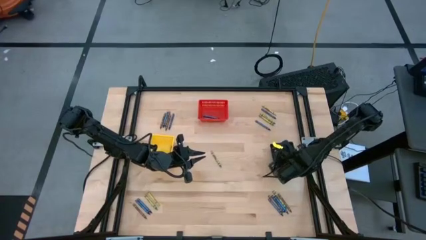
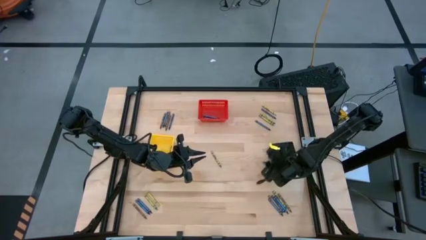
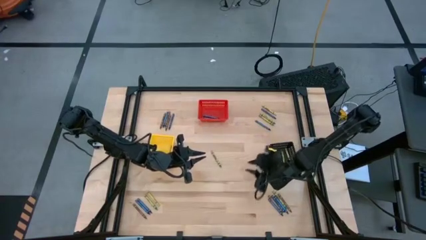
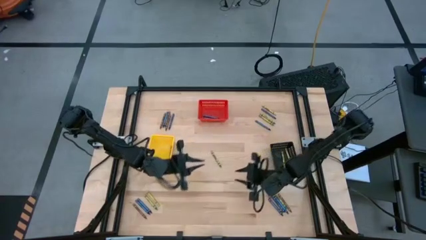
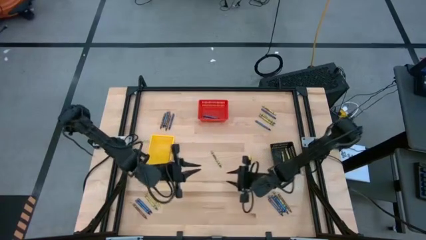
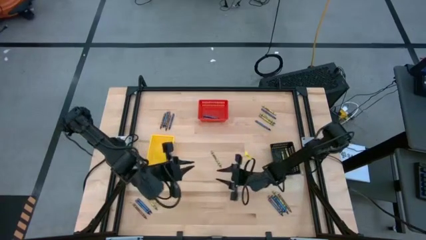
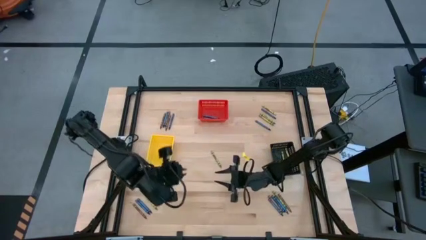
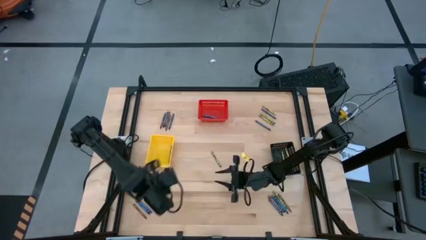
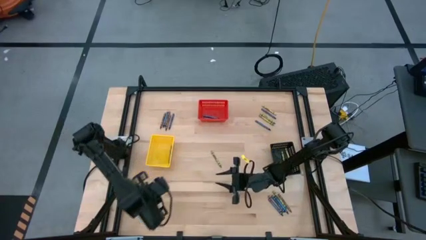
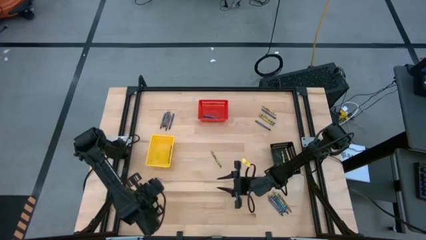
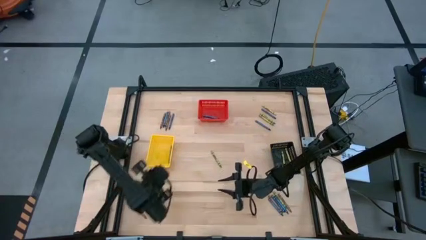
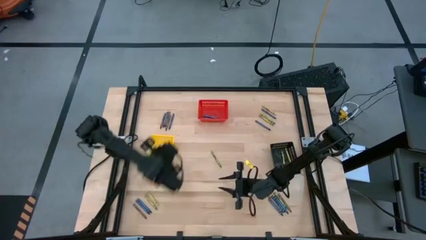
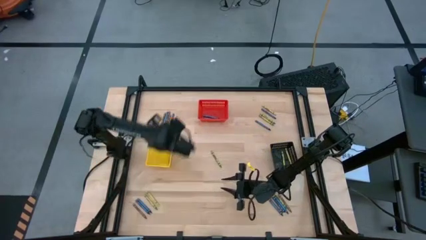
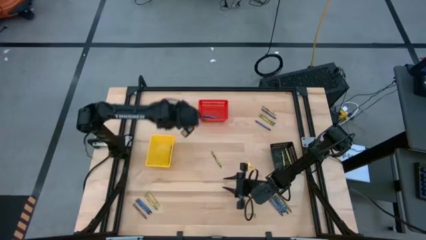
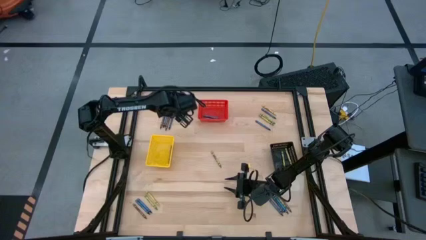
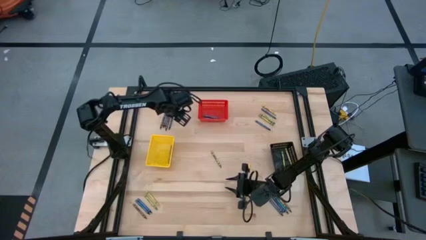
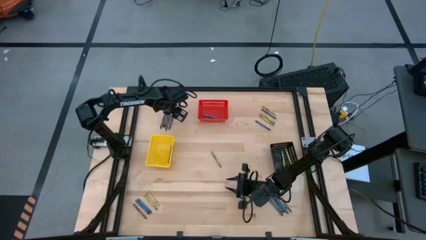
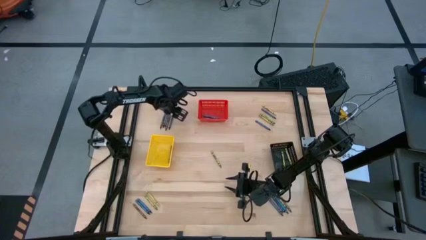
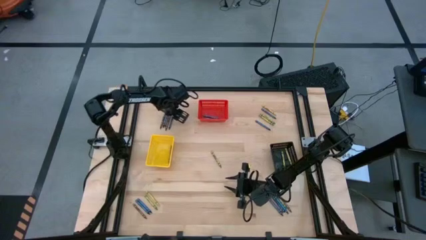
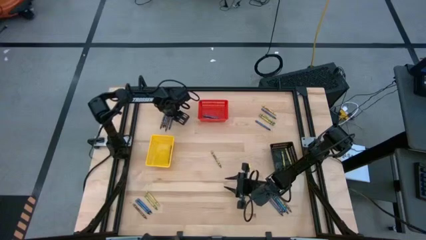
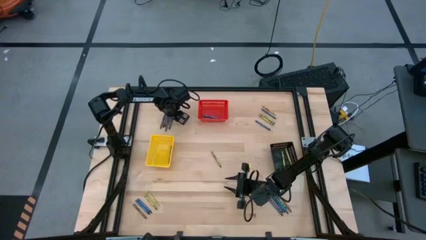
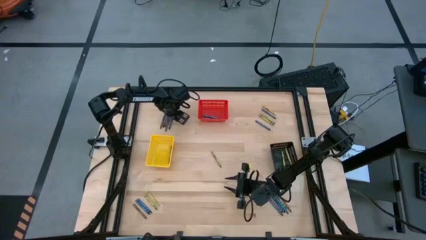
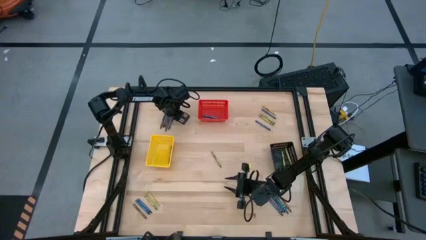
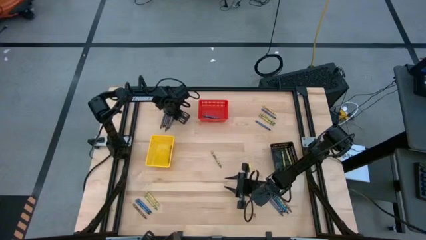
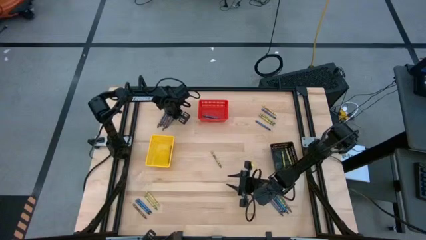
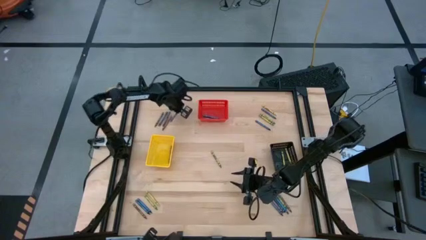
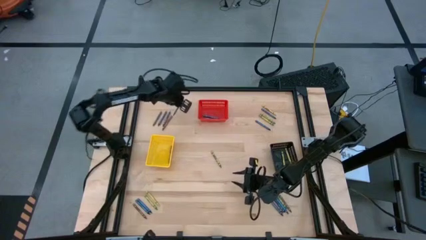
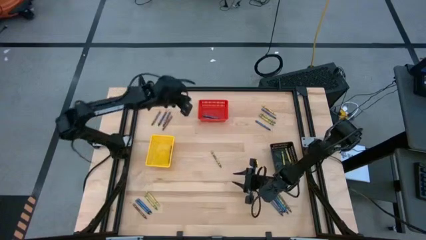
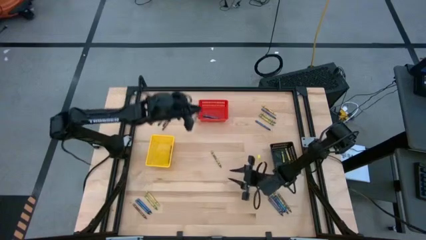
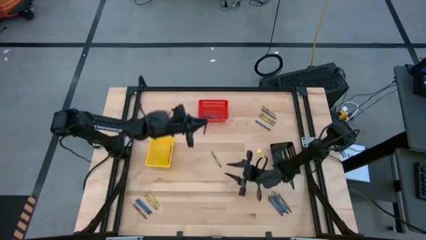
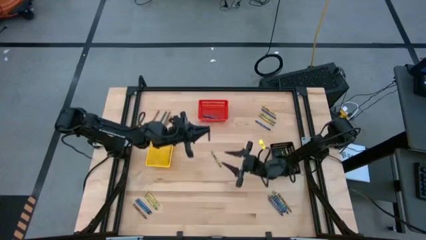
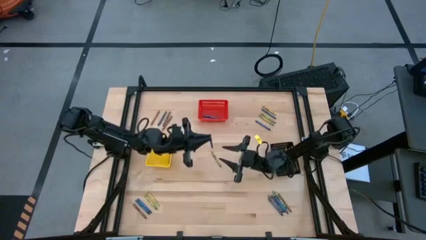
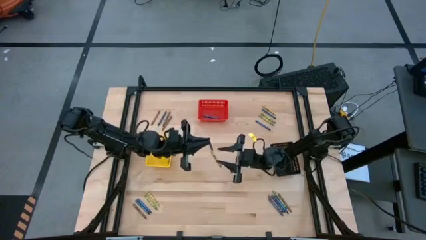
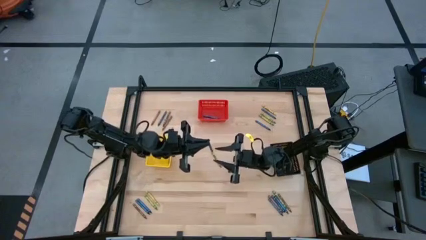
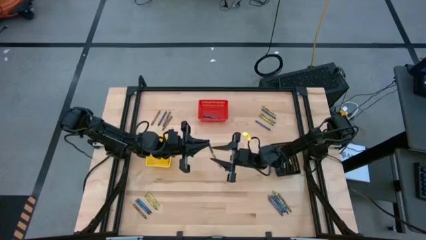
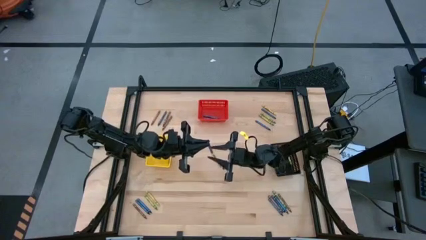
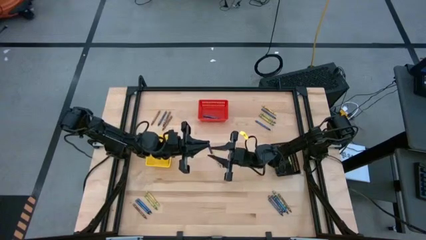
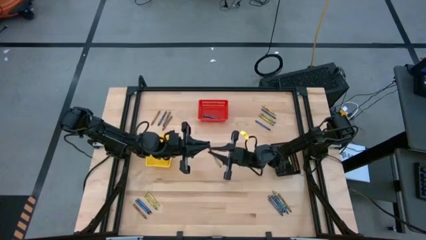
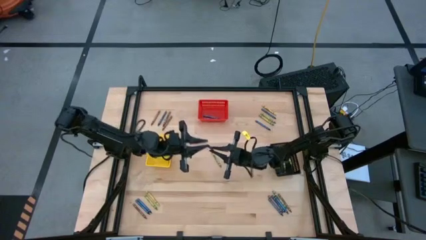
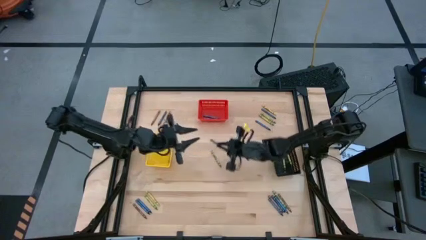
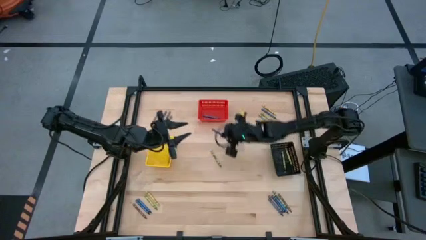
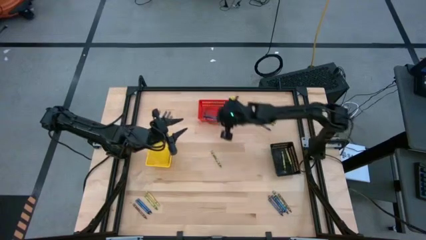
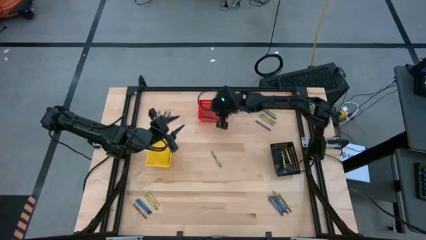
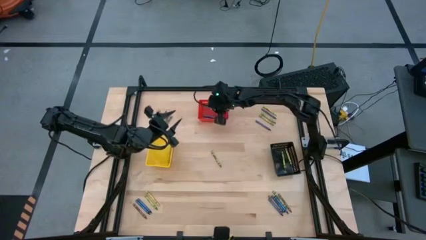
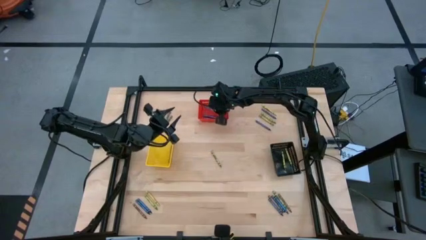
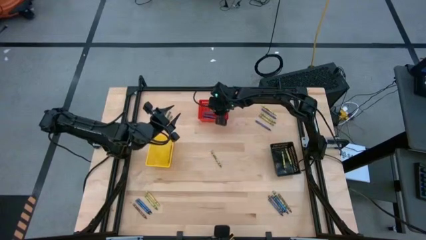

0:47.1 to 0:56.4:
Task: Sort crayons
Put the blue crayon into the red basket

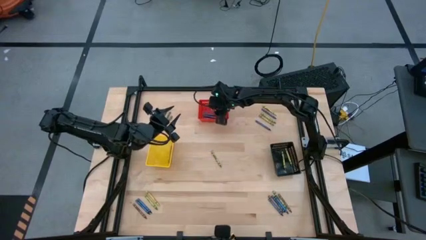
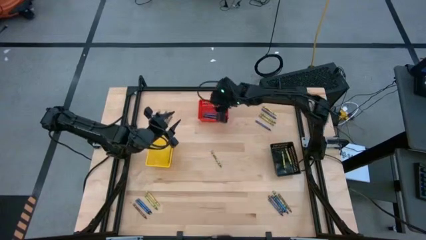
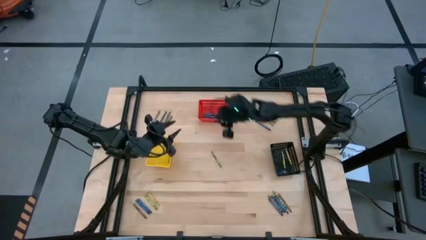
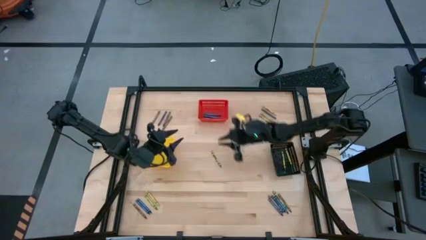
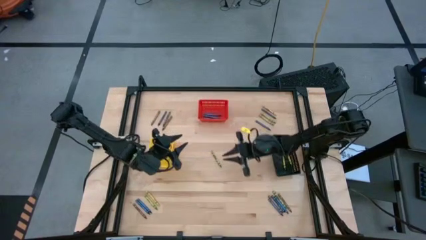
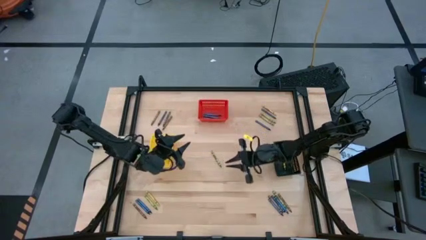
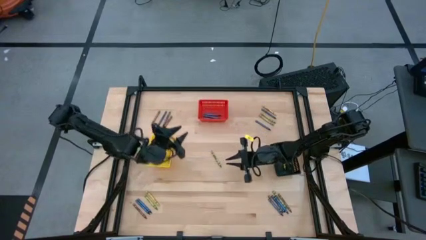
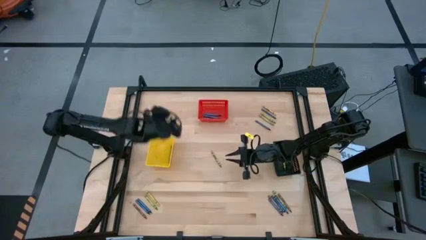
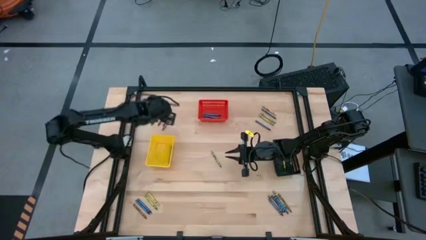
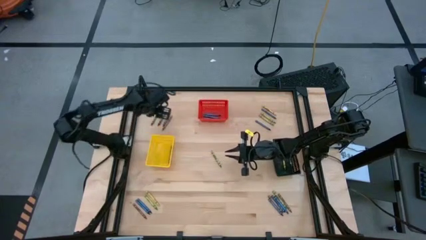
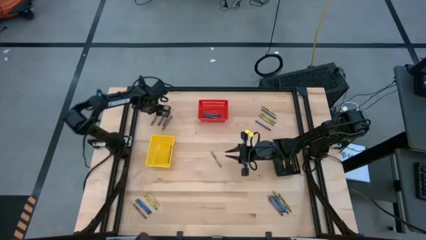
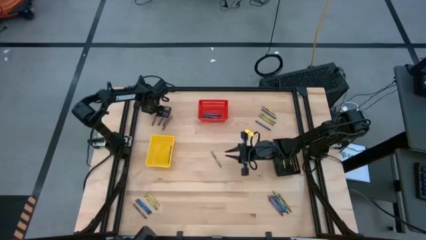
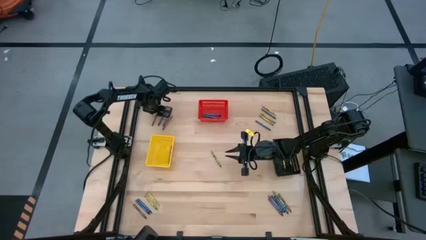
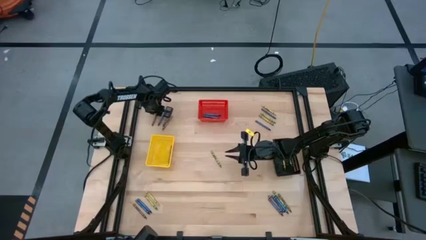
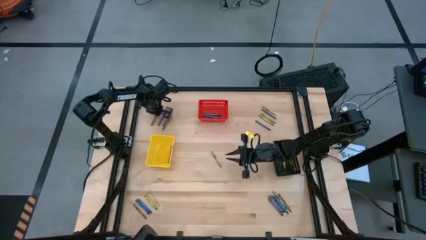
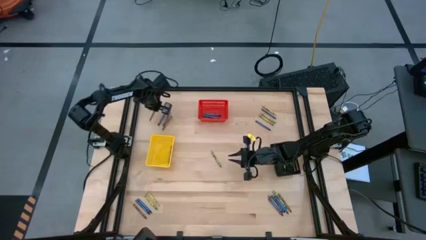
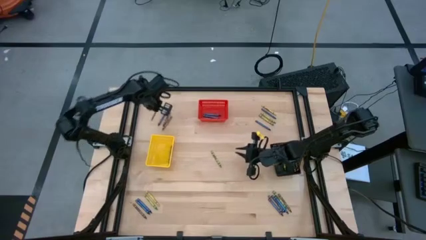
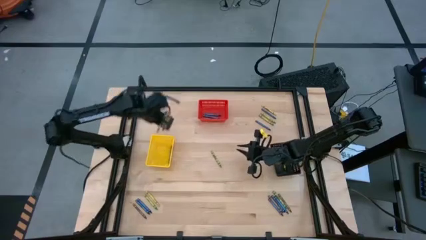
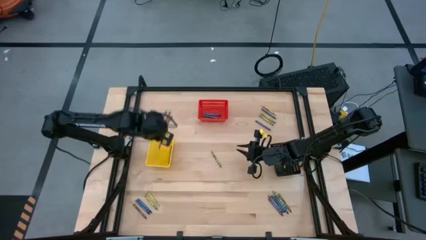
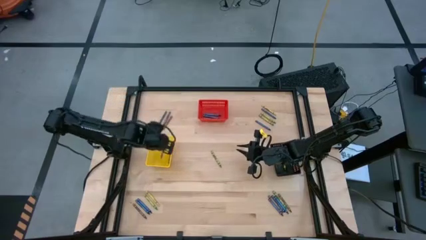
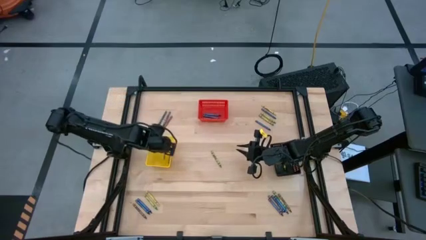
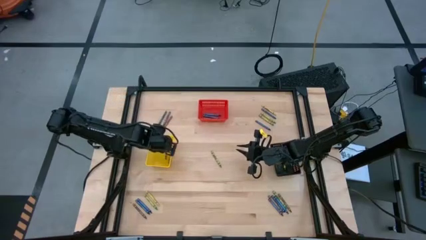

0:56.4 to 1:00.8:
Put the brown crayon into the yellow basket

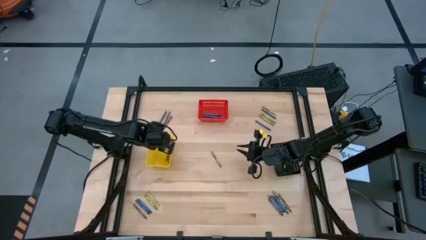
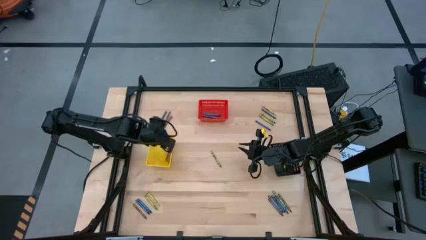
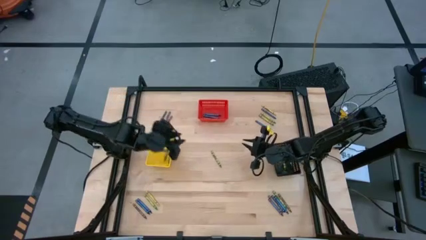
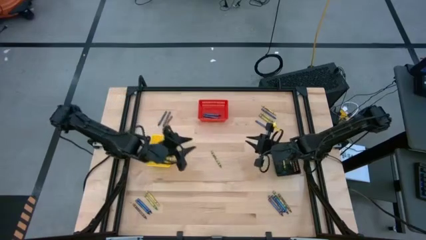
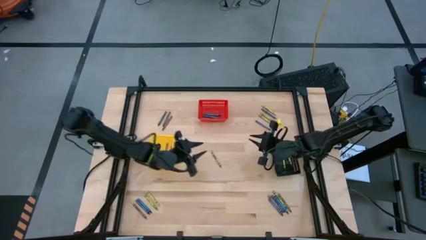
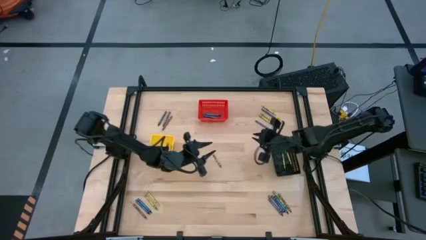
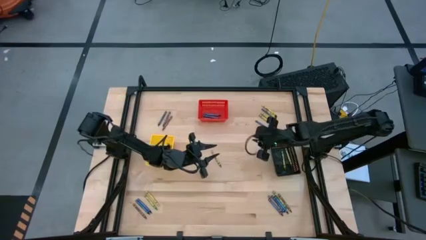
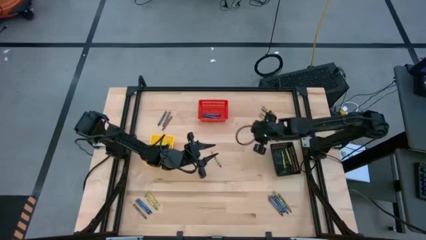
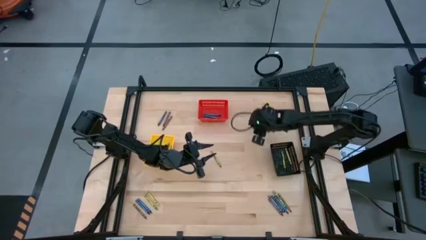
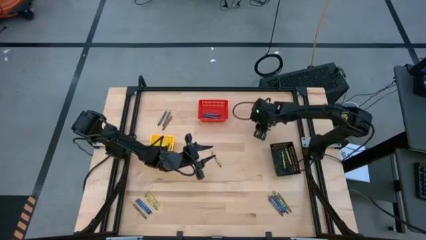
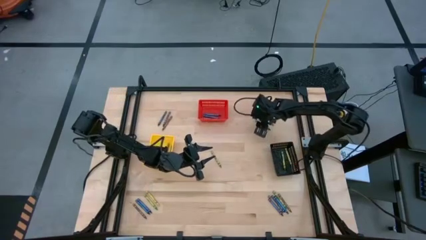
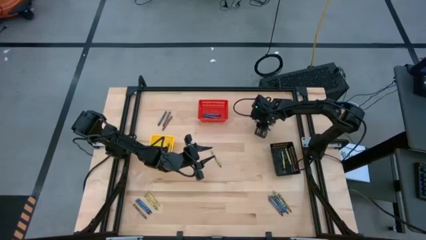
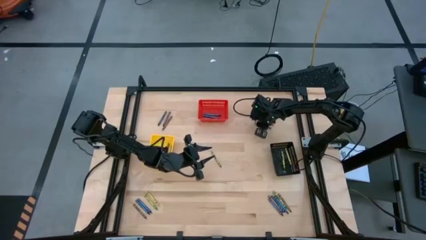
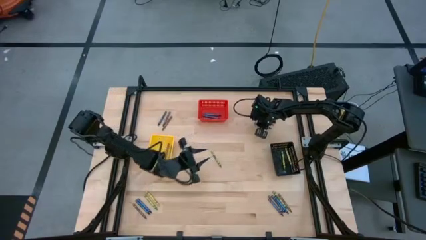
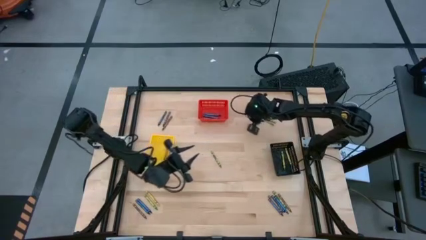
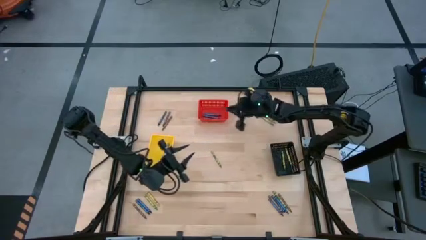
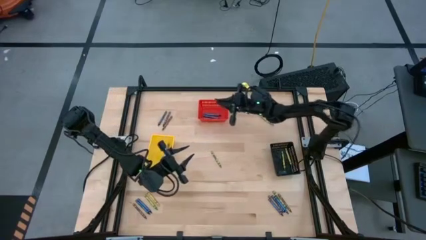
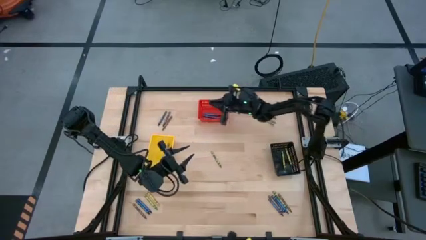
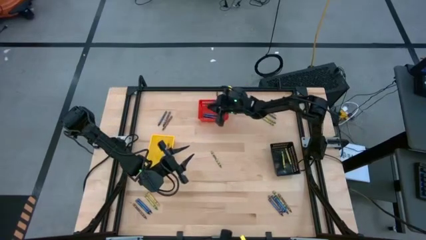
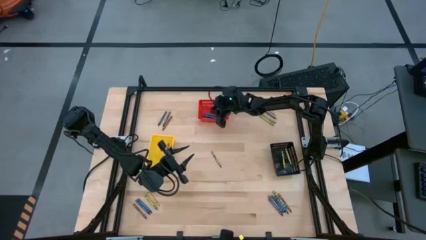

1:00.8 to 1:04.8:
Put the blue crayon into the red basket
